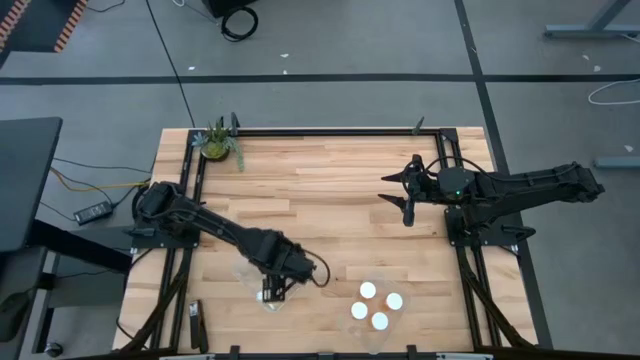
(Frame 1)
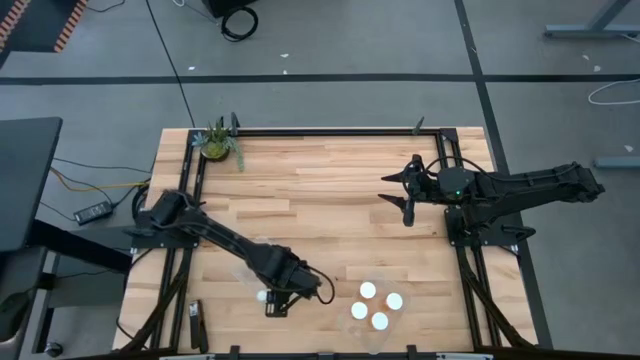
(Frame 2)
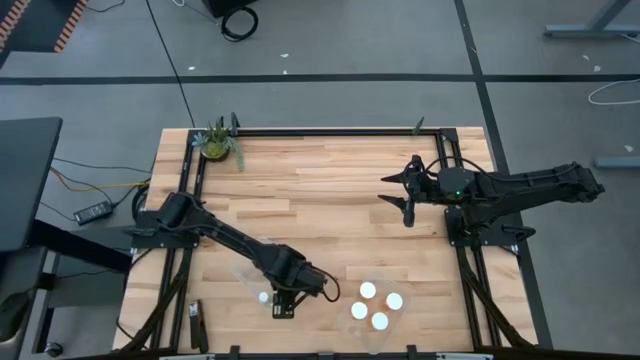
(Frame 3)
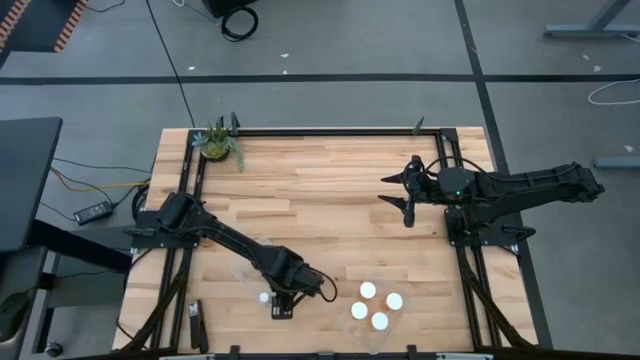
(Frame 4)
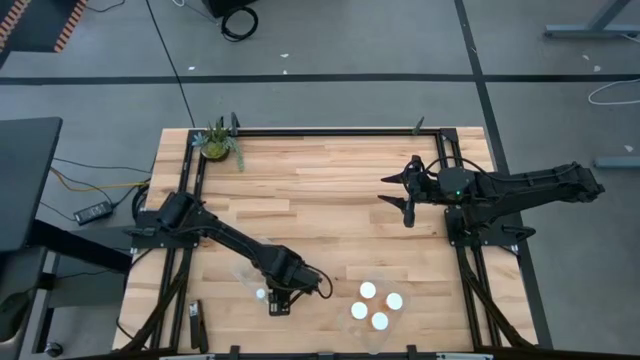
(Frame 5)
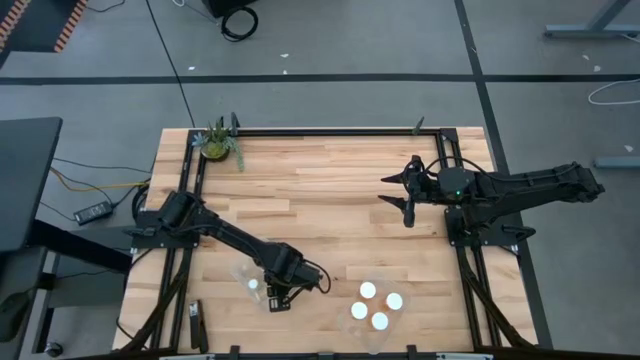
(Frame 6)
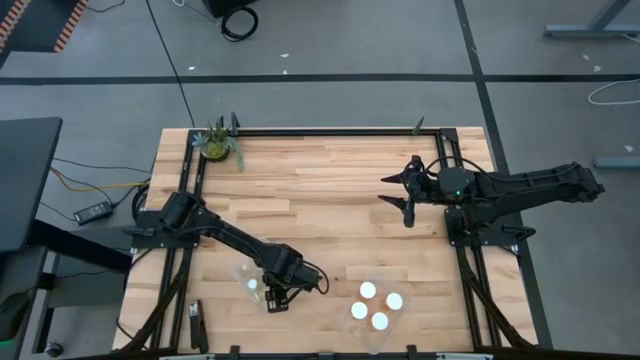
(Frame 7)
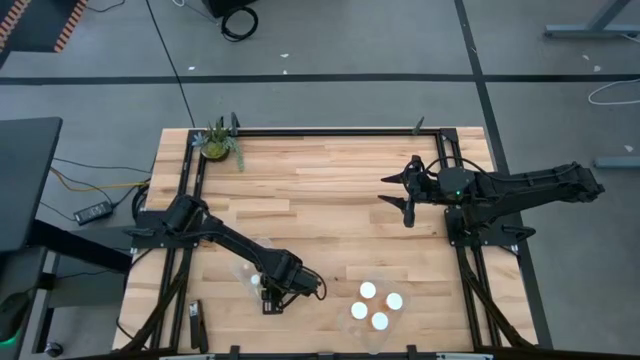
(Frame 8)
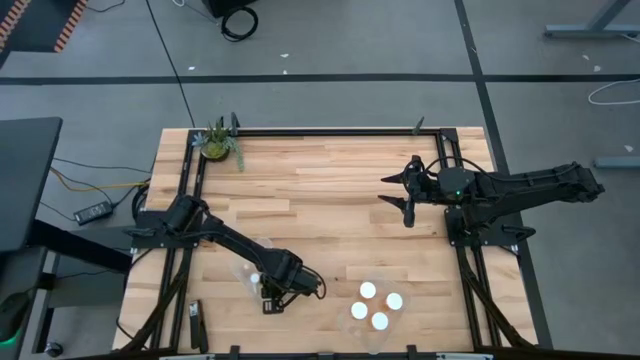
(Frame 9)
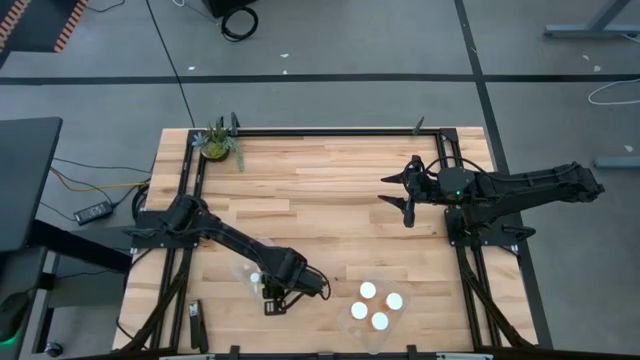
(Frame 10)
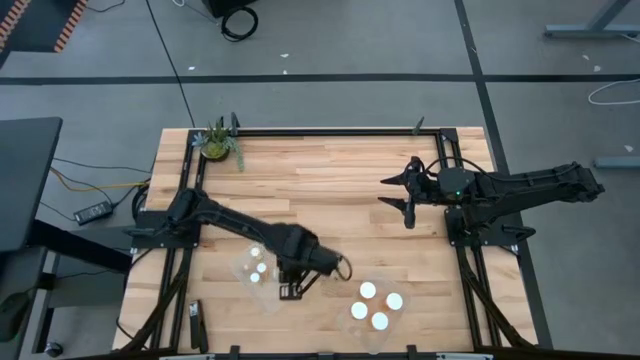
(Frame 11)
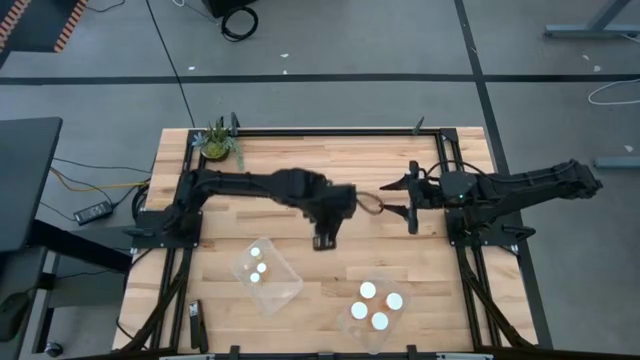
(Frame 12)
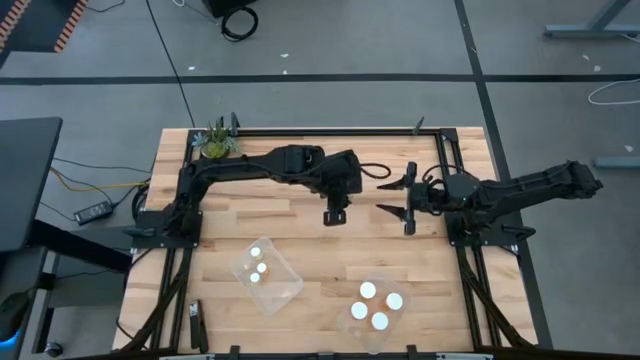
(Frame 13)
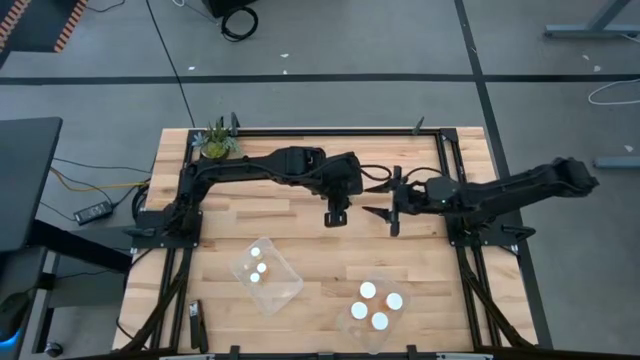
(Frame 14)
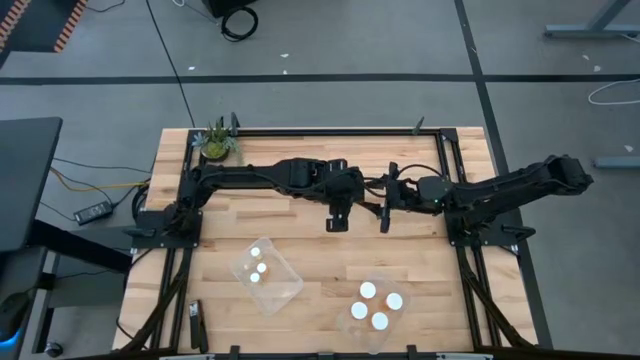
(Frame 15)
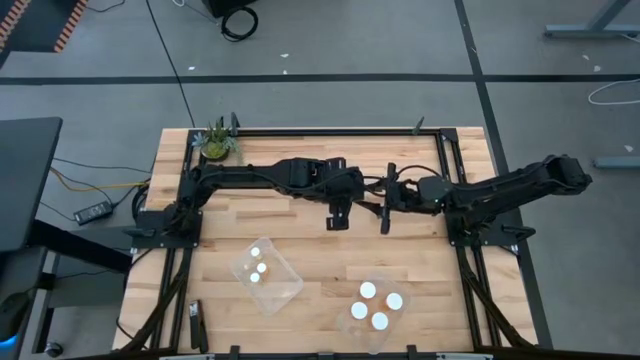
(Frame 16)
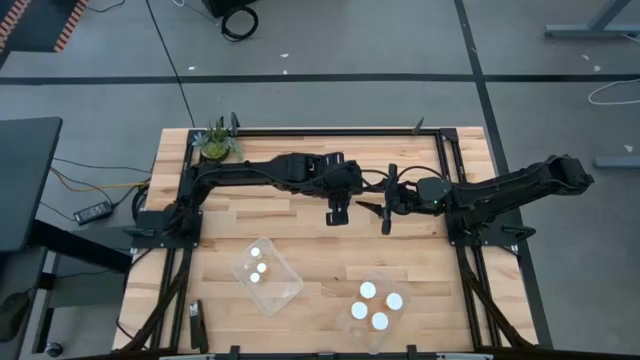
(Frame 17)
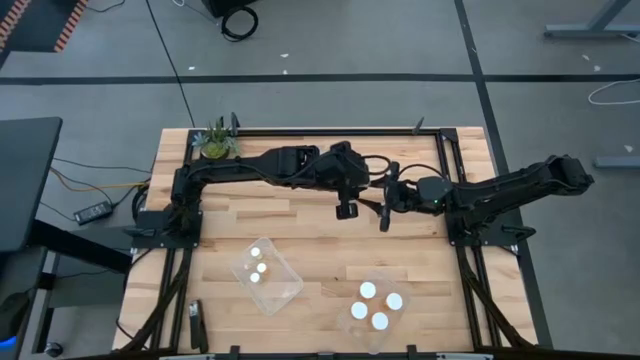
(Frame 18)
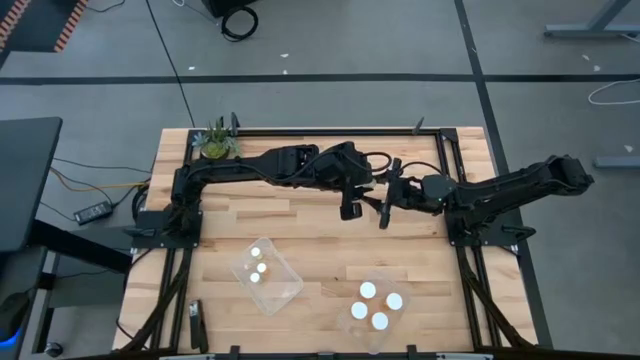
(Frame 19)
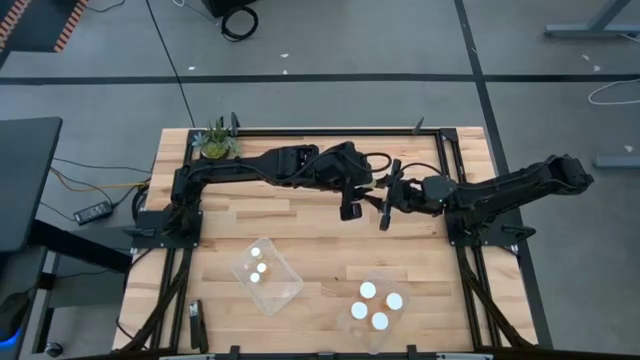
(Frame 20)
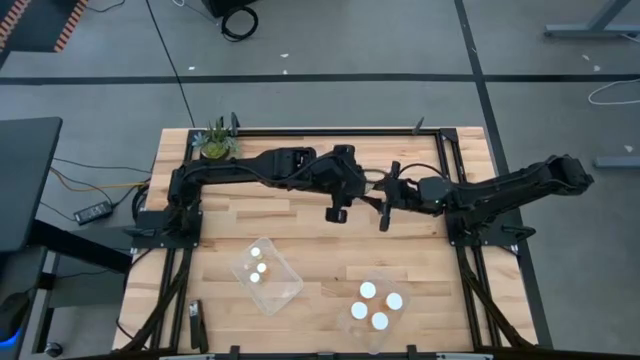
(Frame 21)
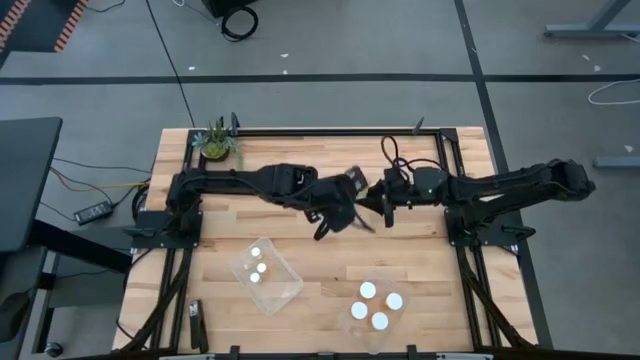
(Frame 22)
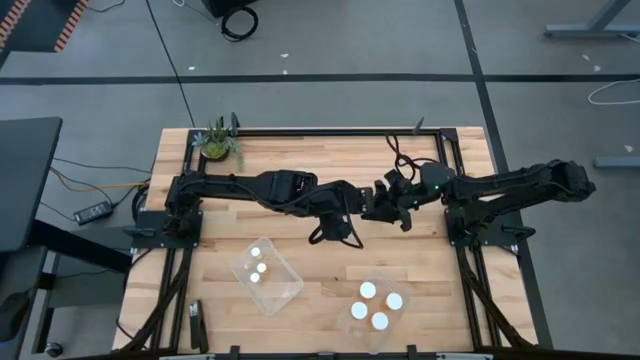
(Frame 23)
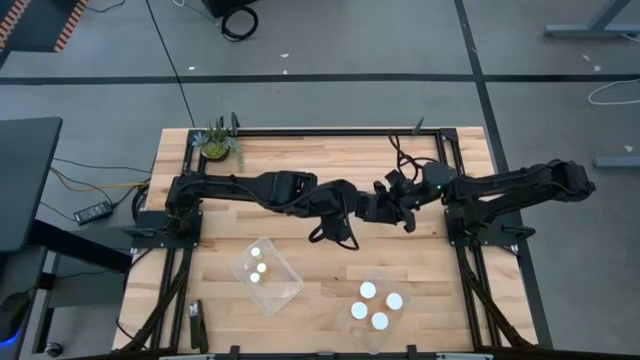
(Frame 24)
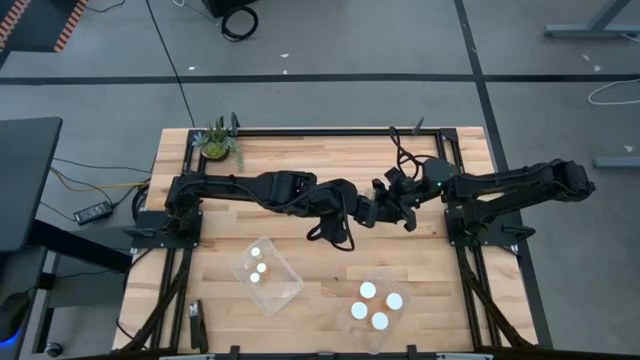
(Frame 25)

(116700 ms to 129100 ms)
Task: Pick and place medicine bottles into bin by pill shape (circle, oval)
Adjust the small yellow pill bottle

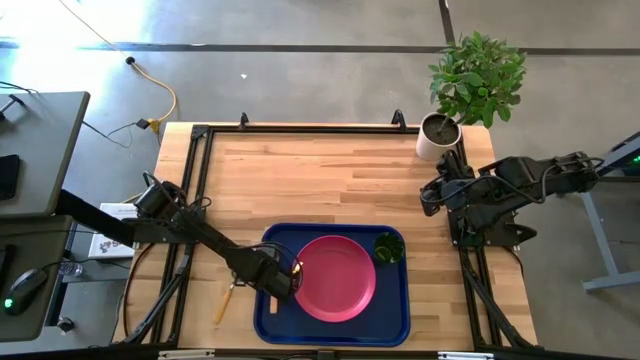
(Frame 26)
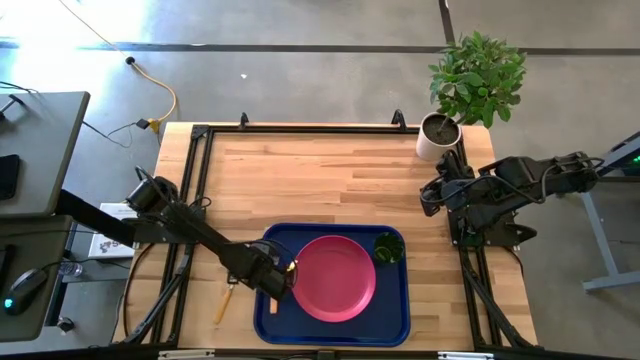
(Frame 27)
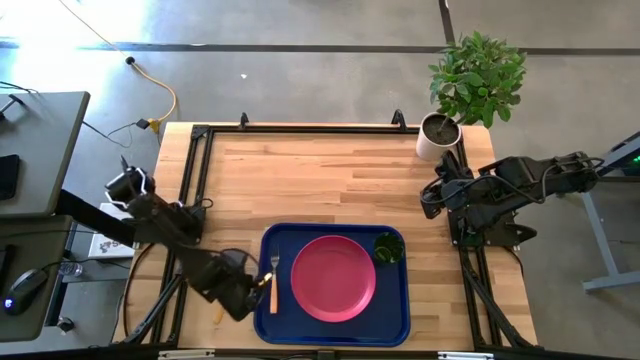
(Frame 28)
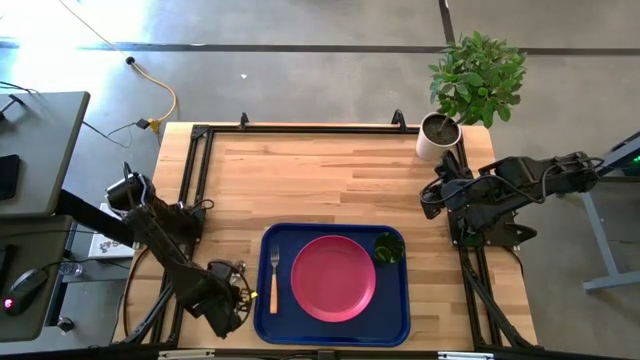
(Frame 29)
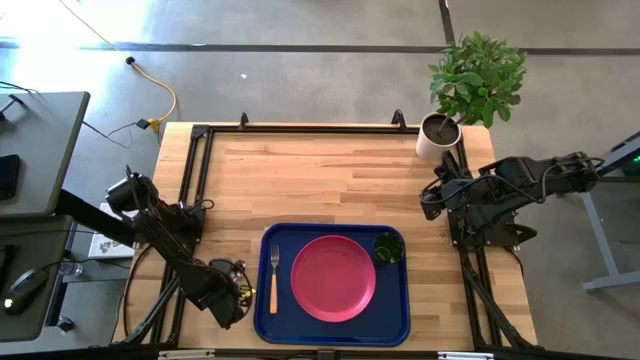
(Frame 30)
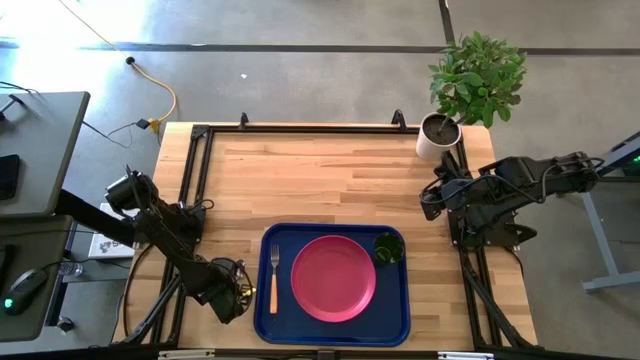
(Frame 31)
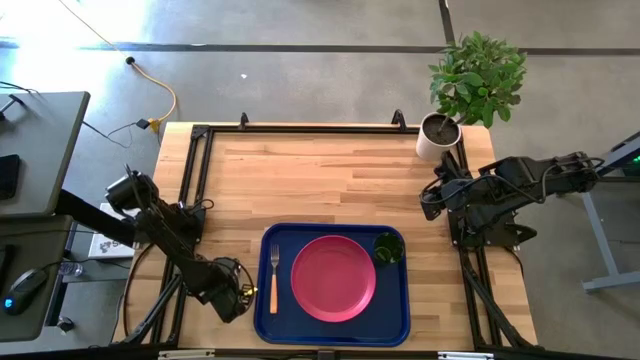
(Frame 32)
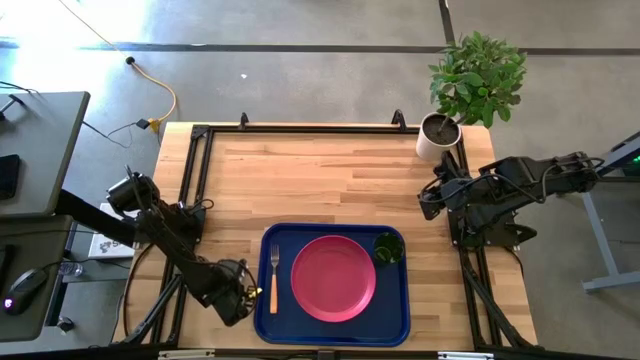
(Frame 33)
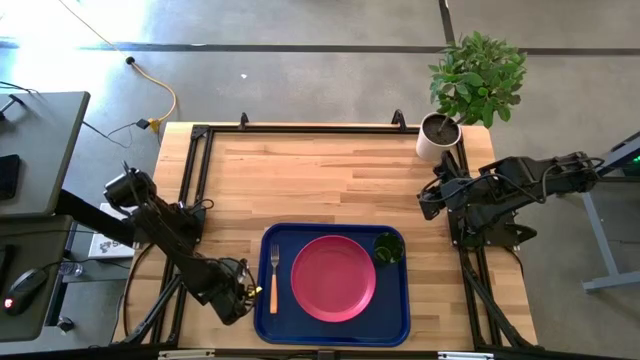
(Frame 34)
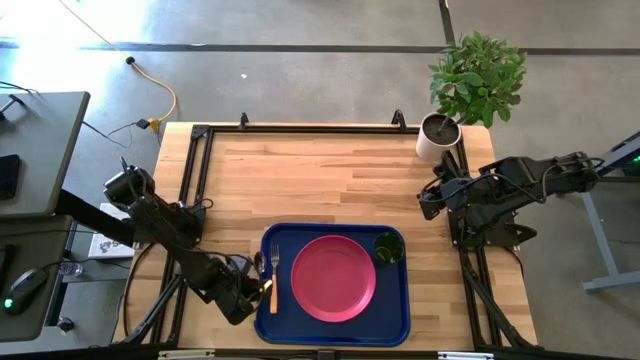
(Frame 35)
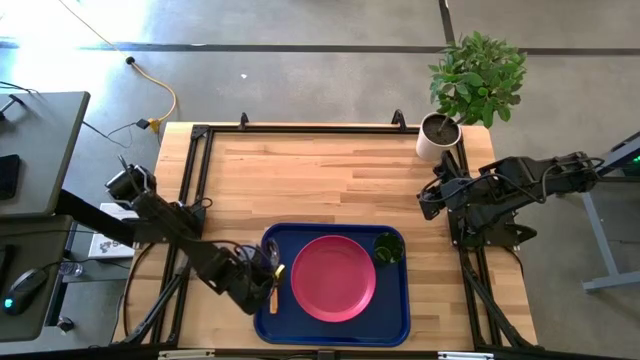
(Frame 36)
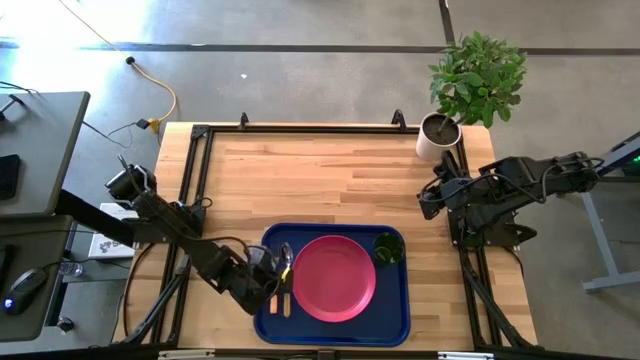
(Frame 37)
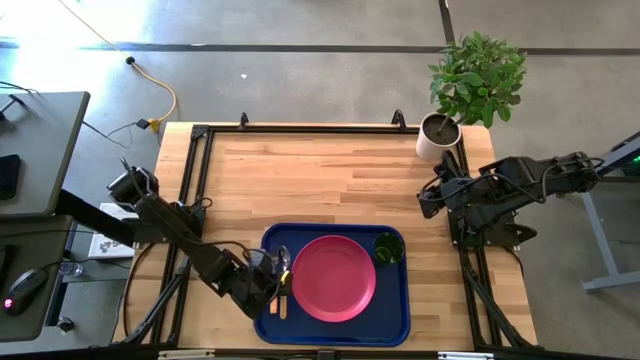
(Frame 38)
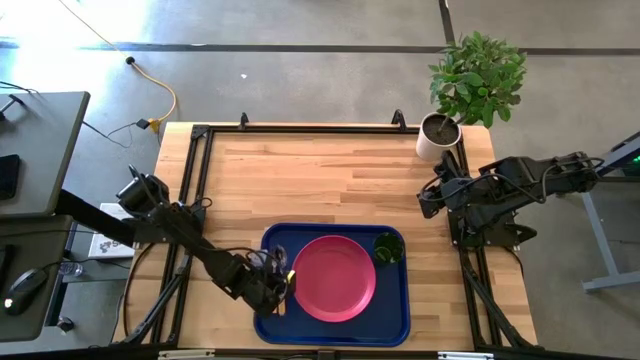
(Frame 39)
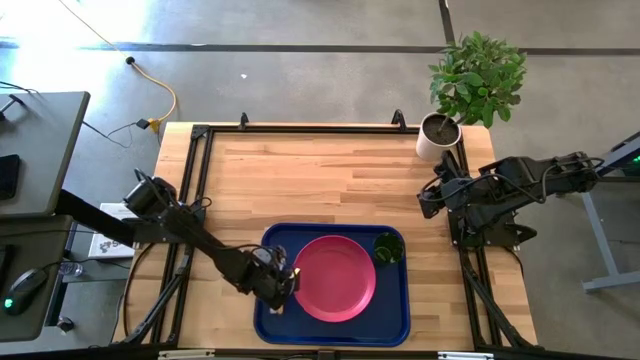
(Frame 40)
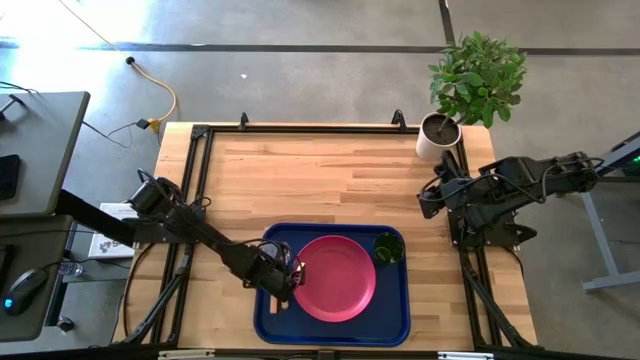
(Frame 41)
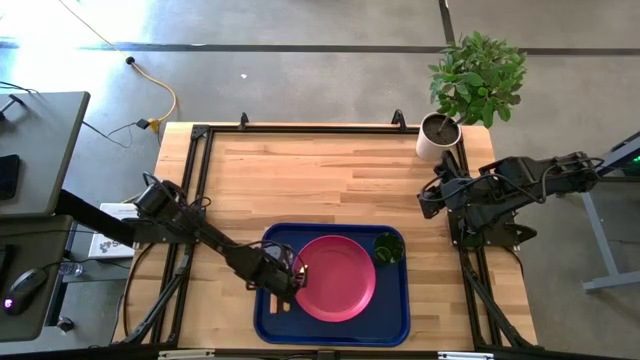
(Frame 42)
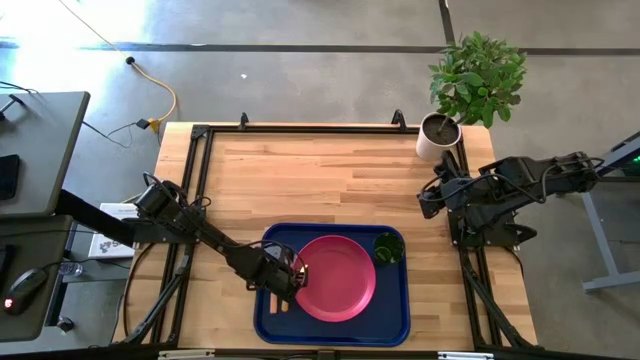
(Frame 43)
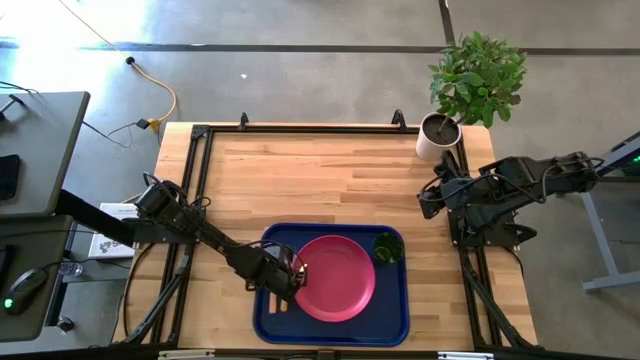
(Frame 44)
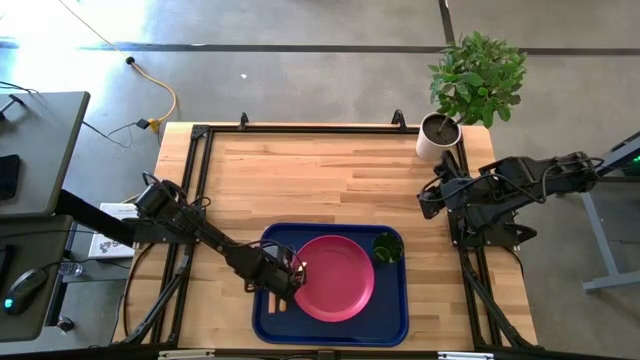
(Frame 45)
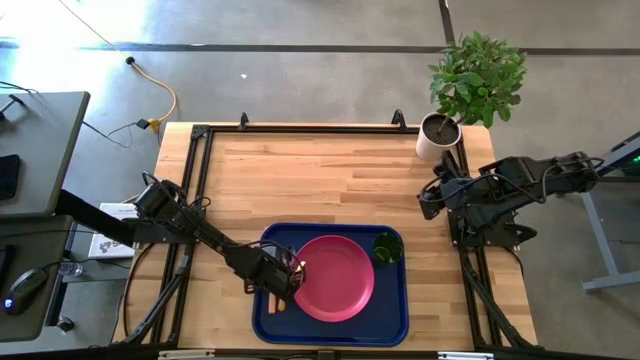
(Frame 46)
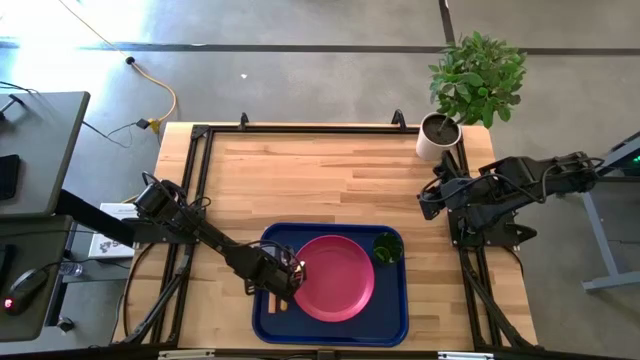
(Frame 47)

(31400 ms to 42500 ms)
Task: Pick and place plate/cup/fork/spoon on tray
Put the yellow spoon on the blue tray to the left of the pink plate
